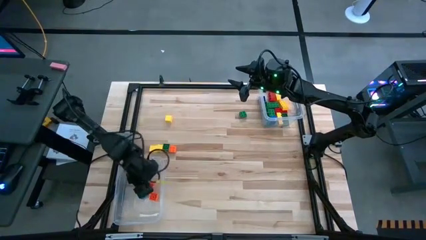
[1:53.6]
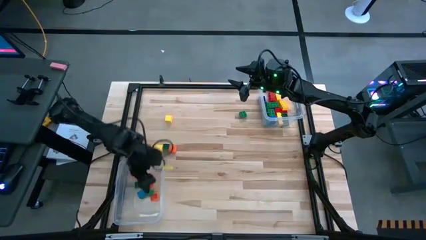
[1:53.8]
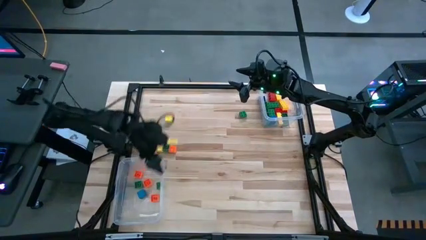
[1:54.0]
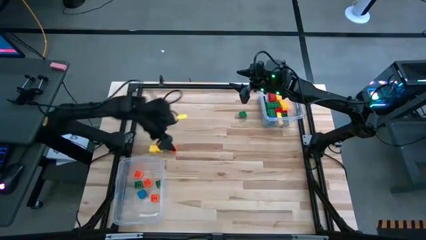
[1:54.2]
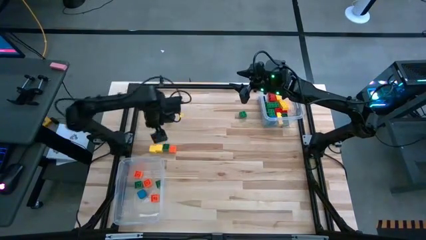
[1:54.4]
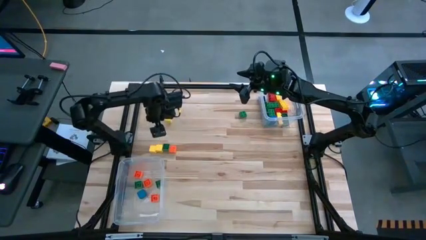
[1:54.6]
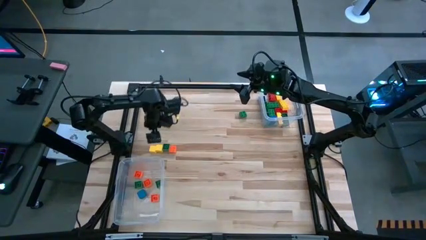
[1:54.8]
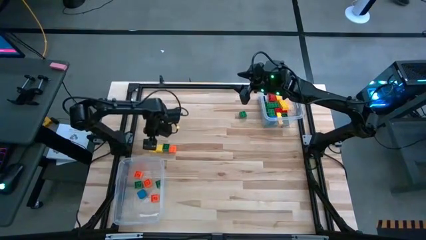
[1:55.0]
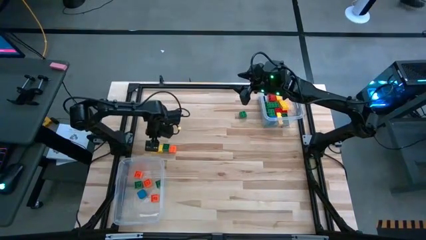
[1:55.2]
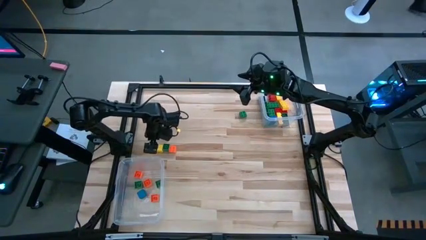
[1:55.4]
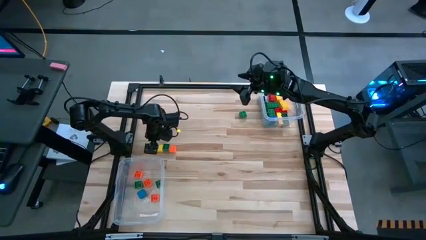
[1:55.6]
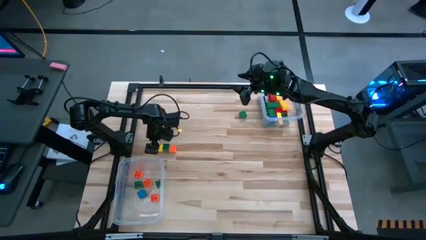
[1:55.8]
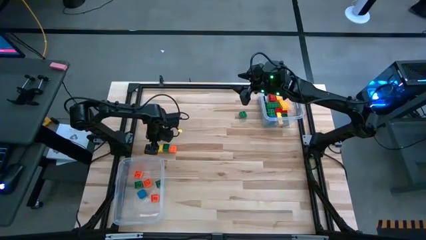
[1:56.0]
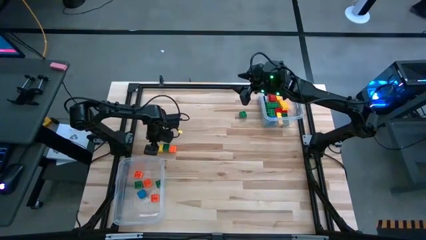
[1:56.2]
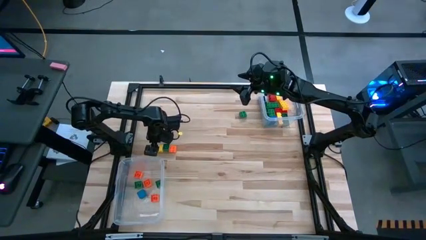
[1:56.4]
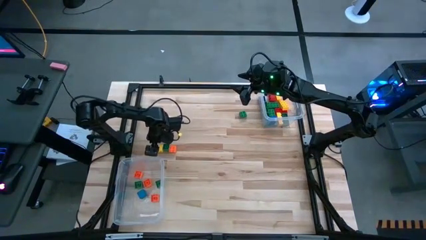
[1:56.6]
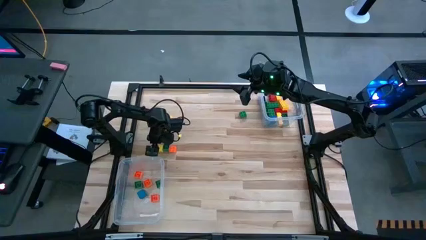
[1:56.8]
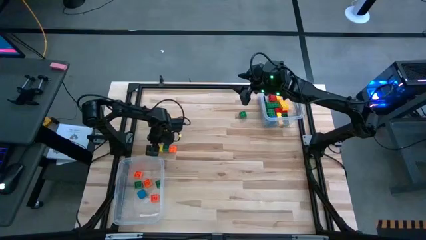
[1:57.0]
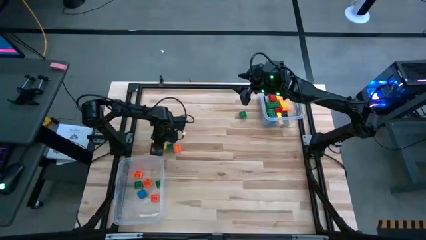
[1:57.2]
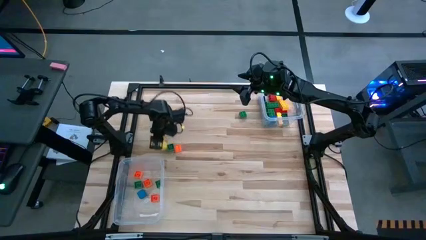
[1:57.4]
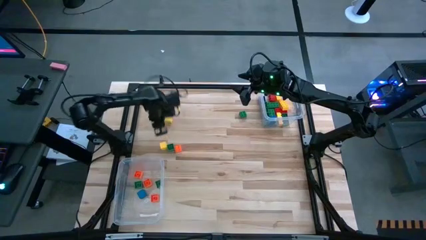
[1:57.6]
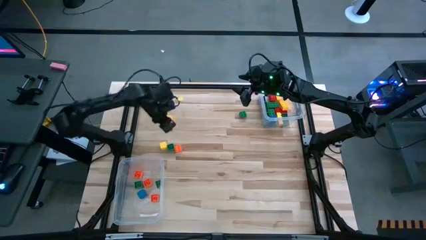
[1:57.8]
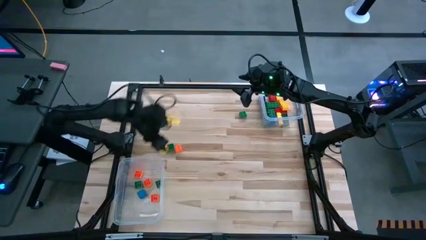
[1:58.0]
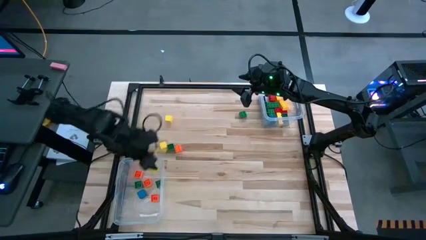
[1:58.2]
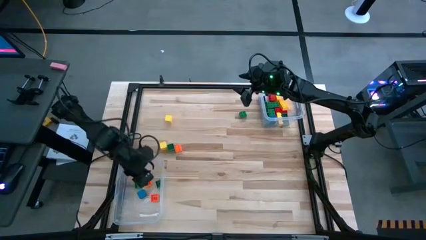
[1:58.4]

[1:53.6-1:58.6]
Task: Sort blocks by size
Put the left small yellow block into the left transparent bin

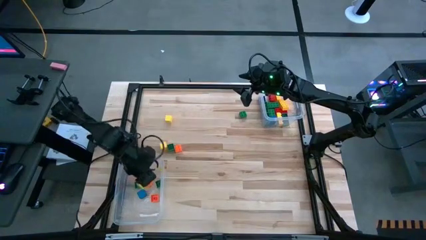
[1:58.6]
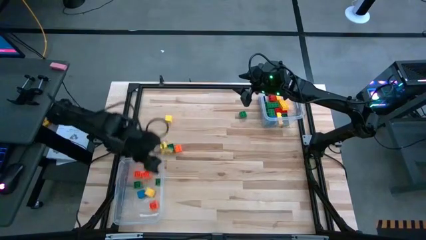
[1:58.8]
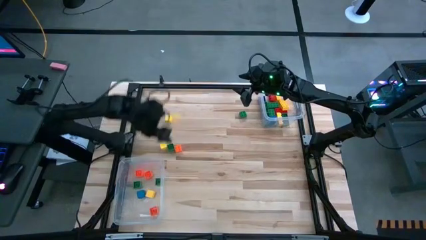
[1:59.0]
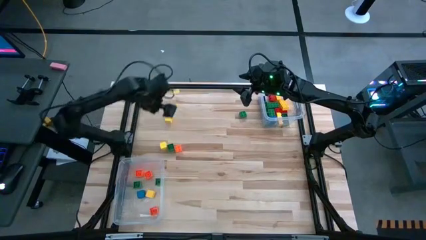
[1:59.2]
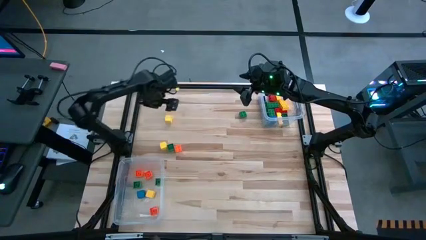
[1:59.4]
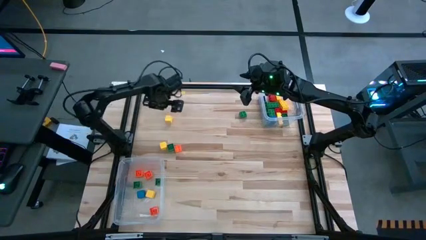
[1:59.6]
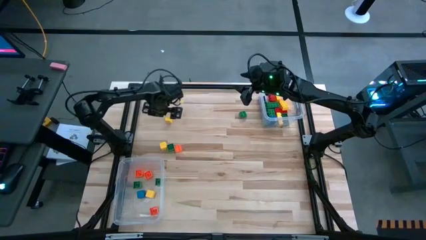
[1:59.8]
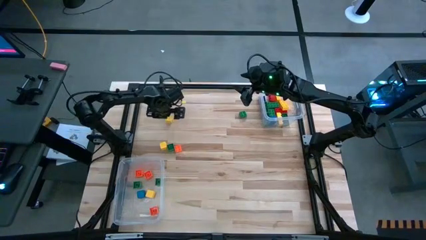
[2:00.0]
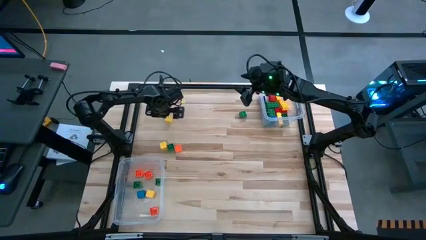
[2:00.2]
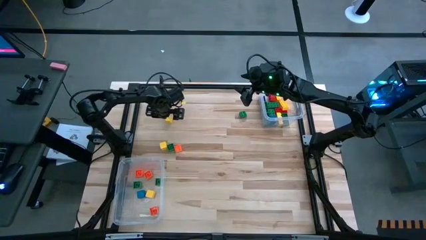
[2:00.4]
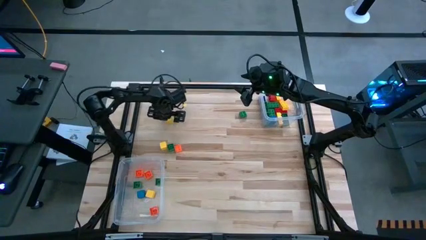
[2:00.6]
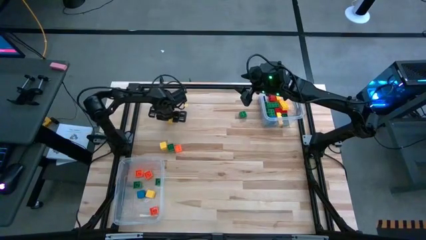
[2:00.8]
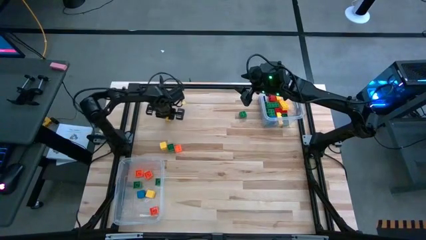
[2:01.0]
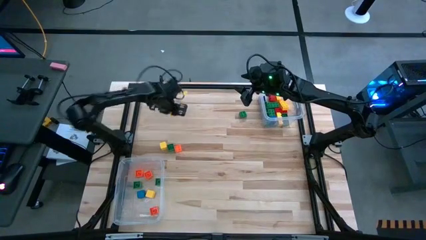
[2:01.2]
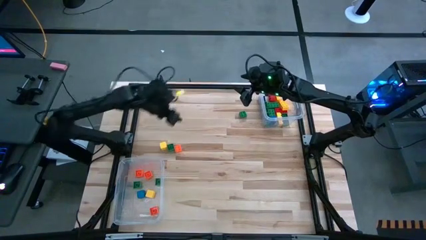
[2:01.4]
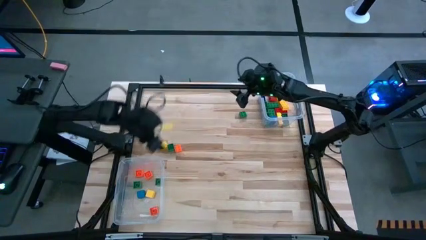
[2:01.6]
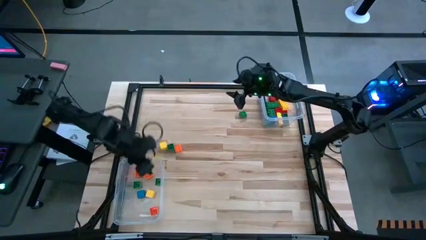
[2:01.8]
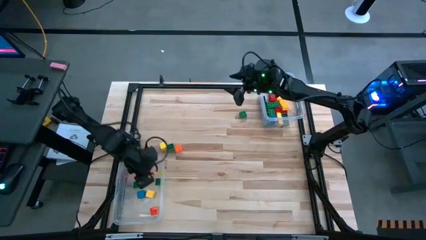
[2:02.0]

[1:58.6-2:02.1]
Put the top left small yellow block into the left transparent bin

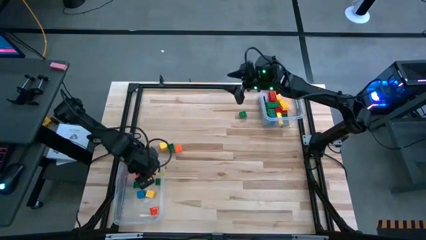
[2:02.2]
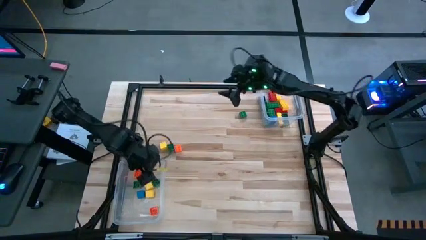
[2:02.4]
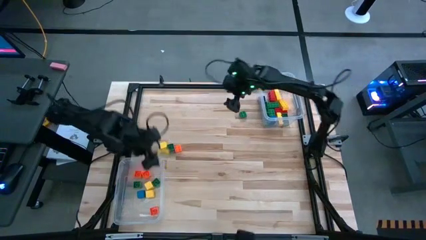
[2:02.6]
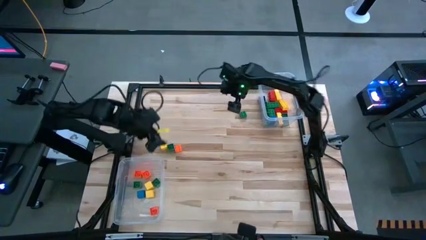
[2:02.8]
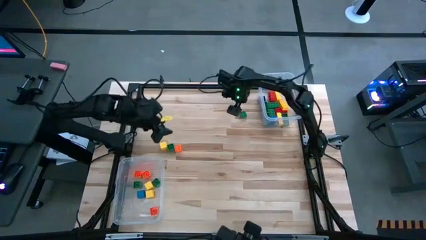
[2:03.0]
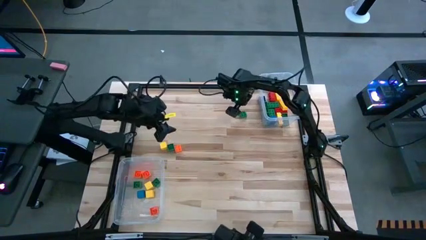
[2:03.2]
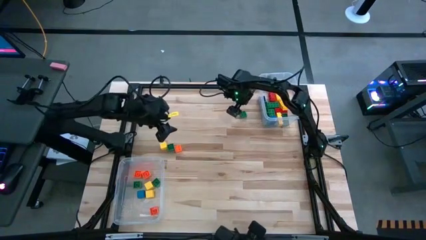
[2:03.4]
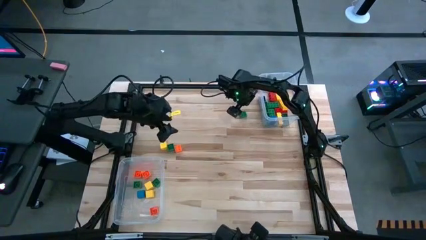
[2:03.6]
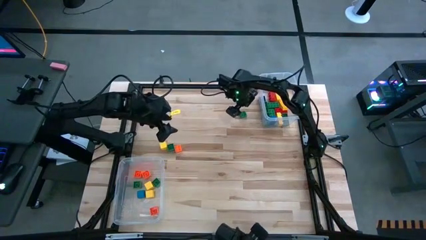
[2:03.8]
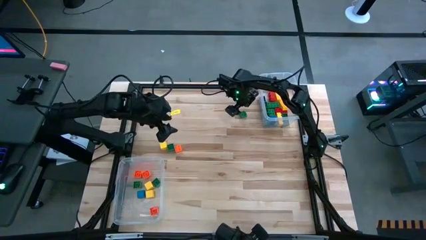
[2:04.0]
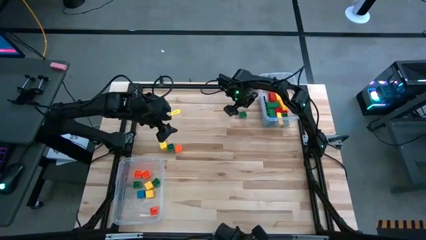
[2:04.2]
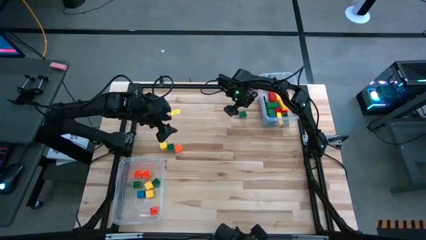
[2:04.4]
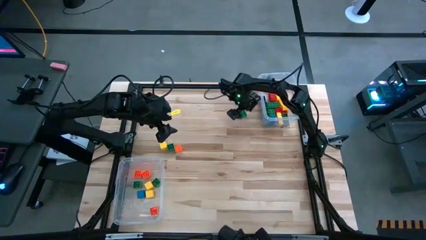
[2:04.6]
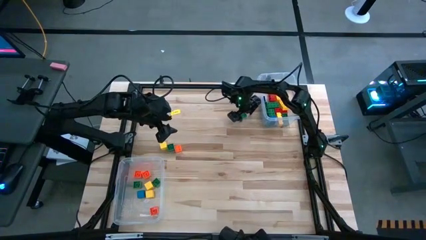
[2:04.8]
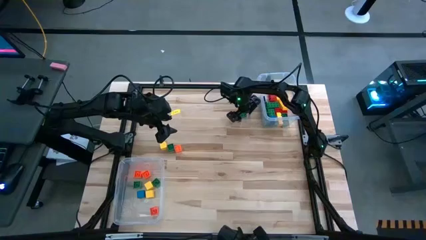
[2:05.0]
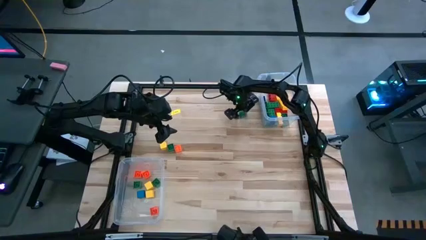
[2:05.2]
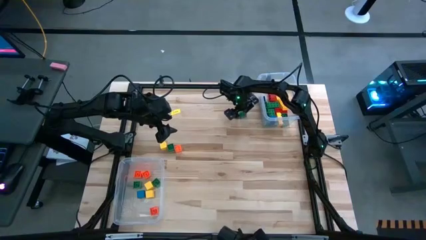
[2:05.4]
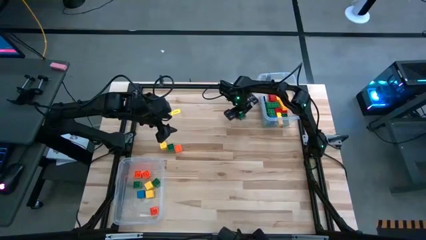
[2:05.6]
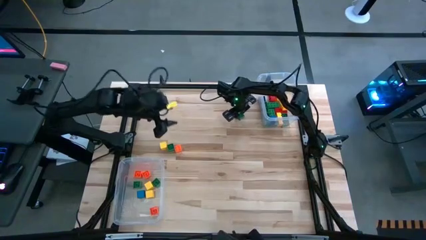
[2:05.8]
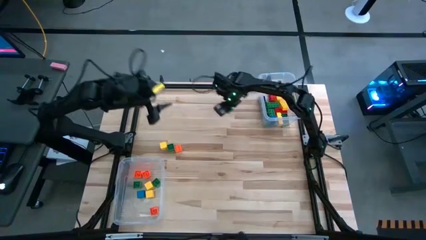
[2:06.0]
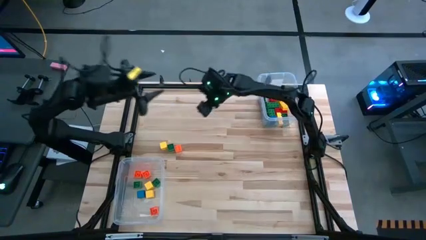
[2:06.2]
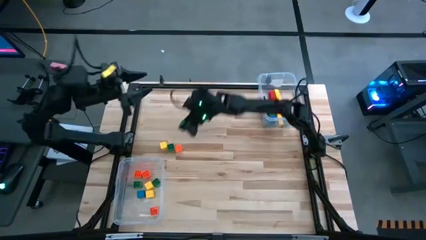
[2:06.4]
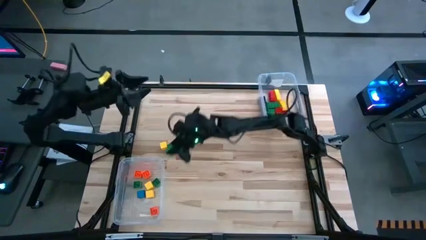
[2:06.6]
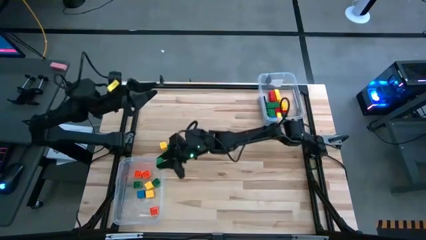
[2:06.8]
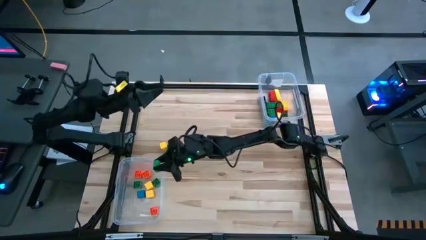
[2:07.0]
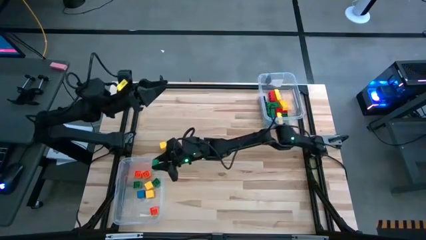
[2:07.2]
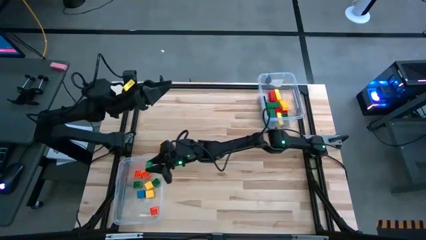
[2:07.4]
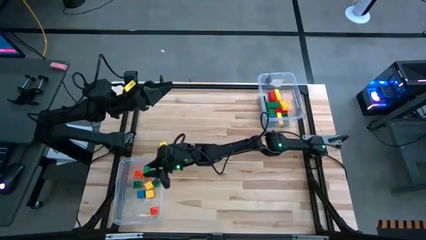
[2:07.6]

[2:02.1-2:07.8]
Put the right small green game piece into the left transparent bin

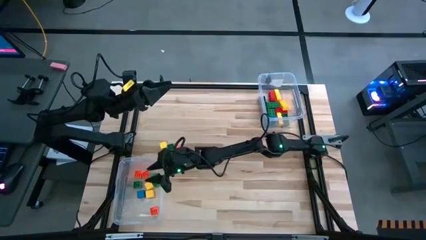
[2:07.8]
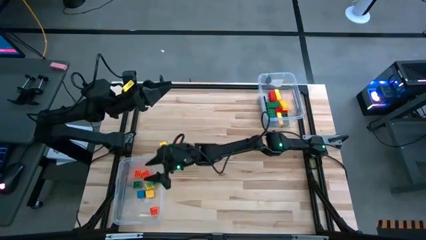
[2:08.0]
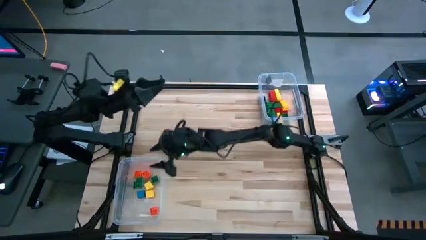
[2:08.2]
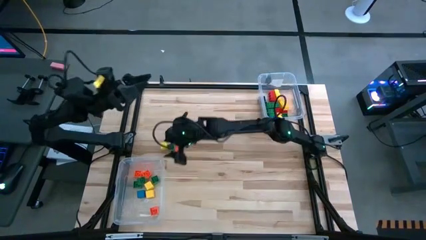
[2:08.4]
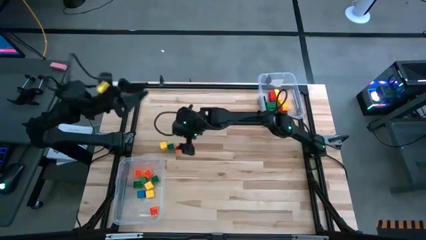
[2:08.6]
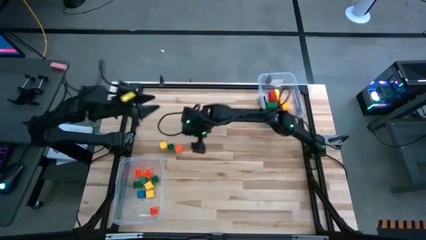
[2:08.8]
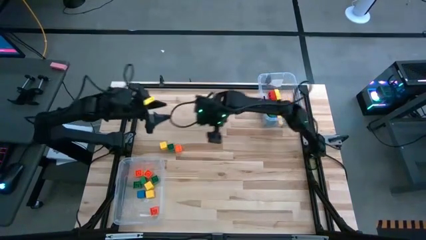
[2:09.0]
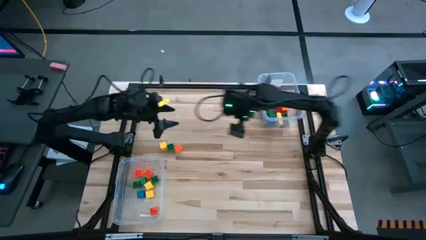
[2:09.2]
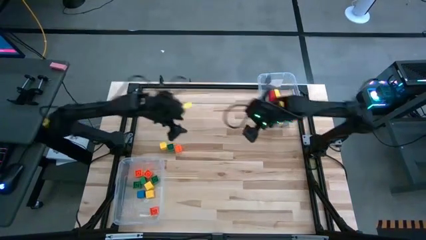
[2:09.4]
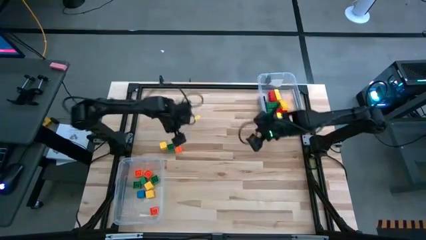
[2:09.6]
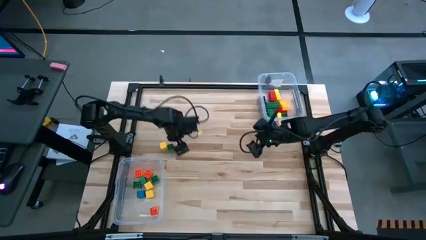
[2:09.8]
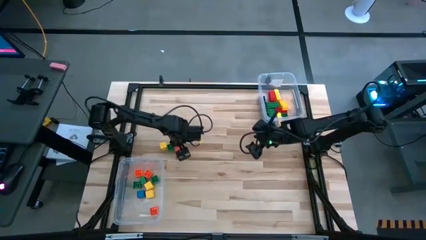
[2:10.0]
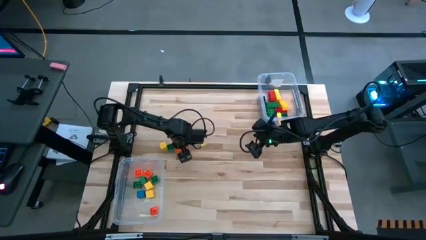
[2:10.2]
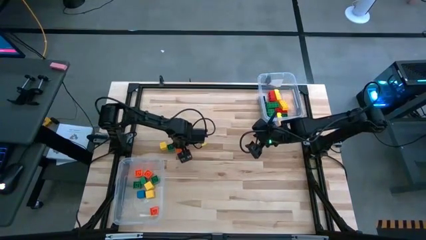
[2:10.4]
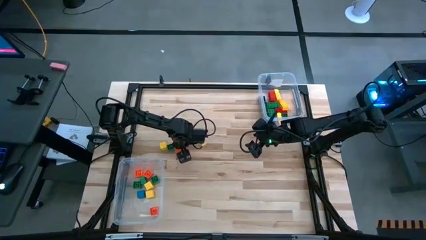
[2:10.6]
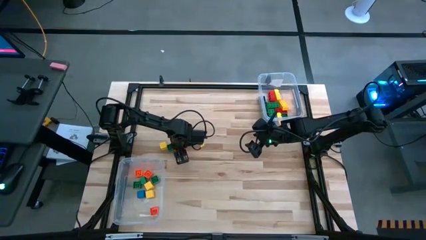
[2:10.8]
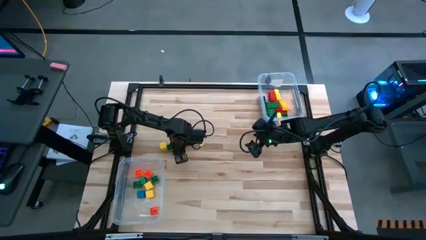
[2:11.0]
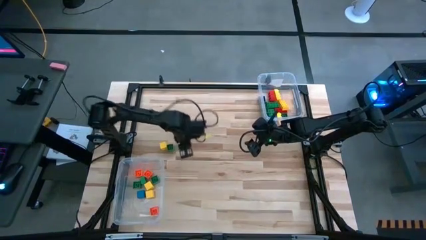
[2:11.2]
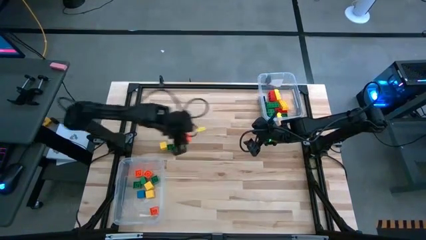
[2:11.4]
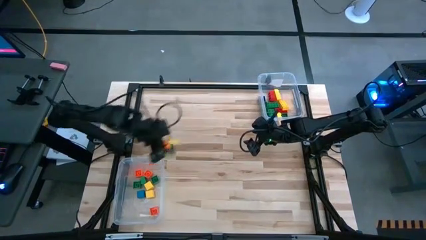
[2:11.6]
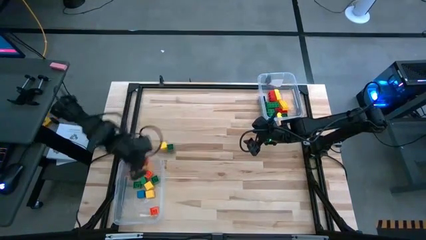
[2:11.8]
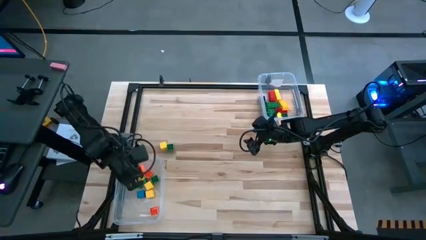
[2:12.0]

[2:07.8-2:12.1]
Put the small orange game piece into the left transparent bin
